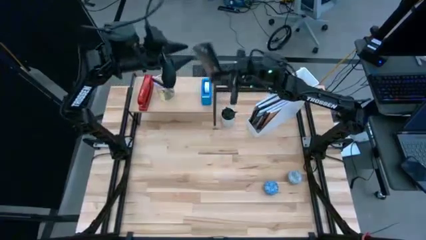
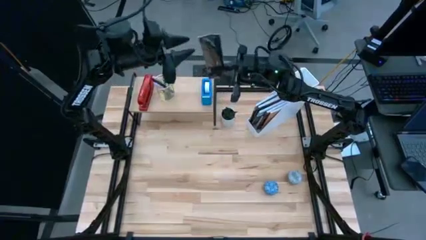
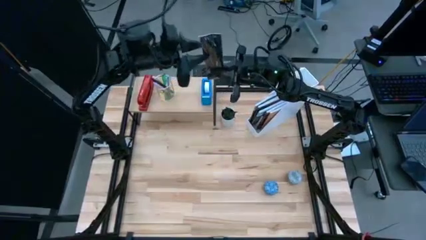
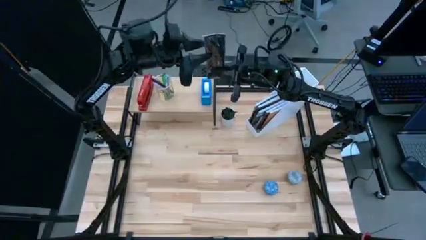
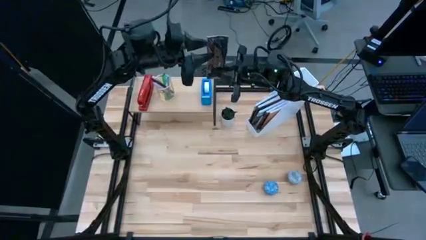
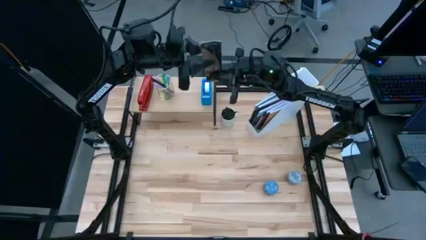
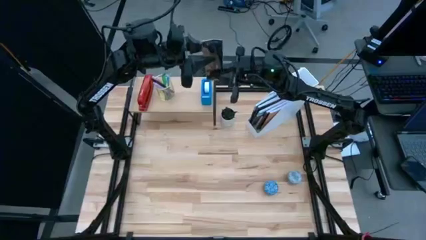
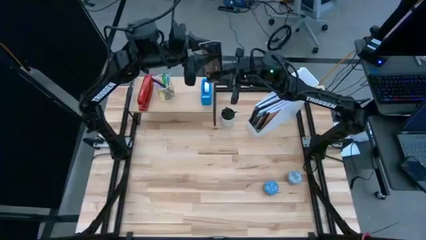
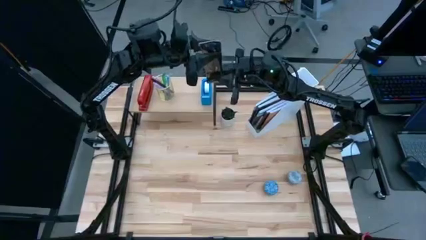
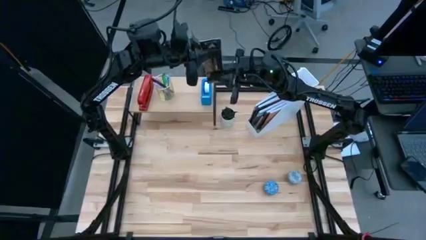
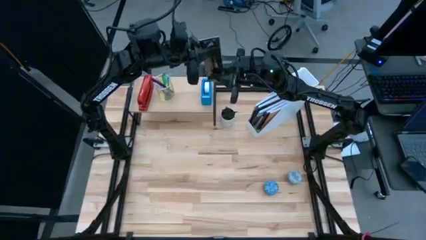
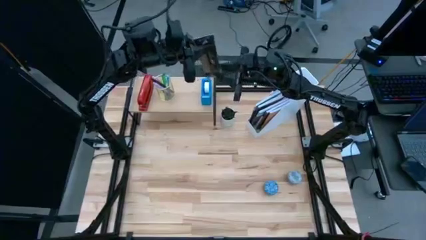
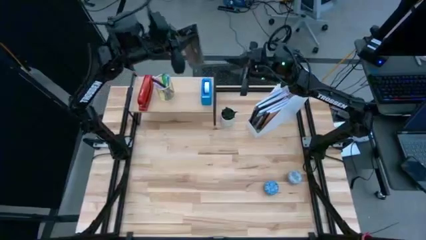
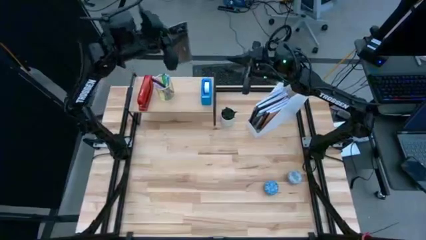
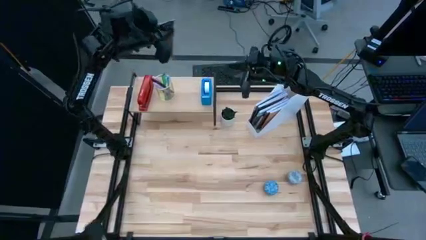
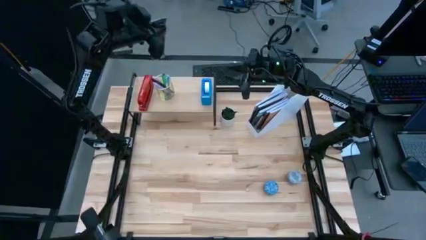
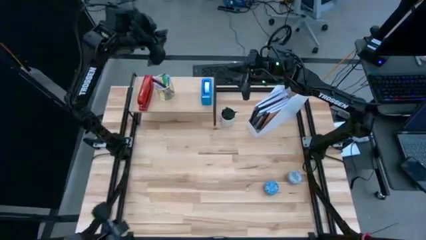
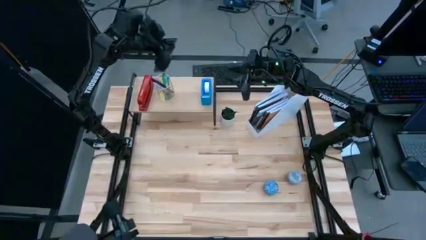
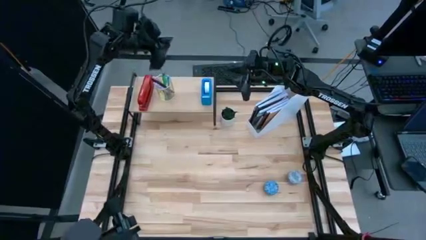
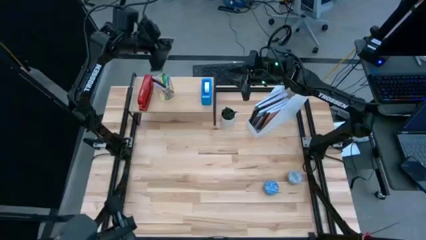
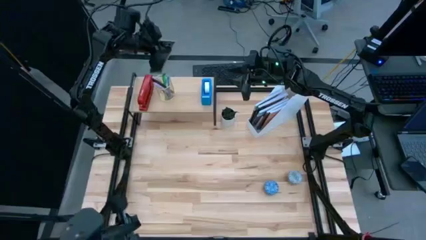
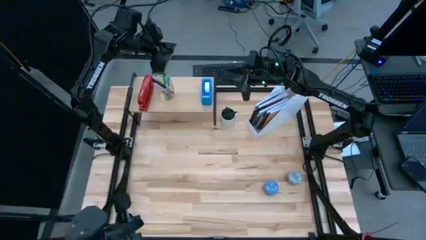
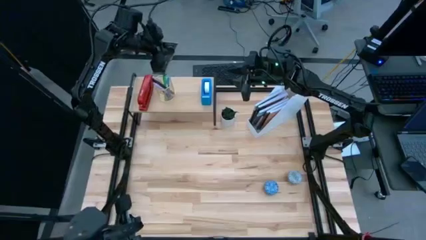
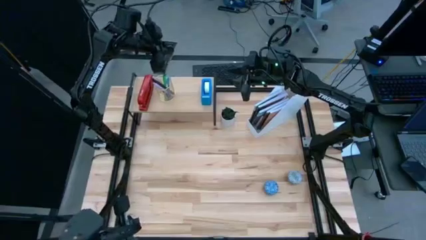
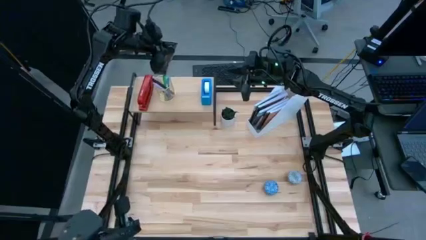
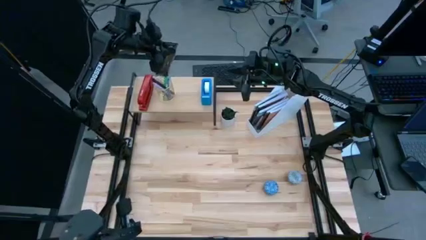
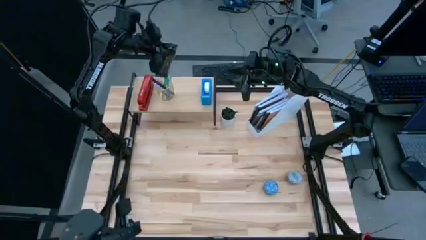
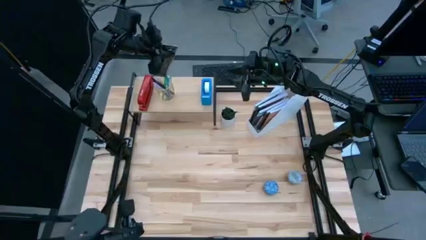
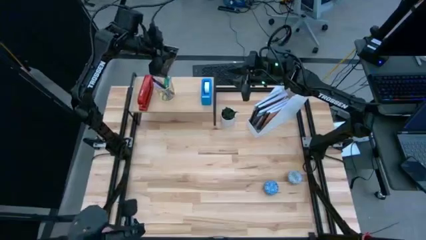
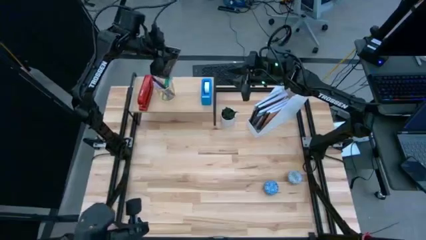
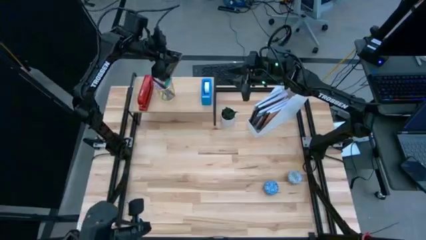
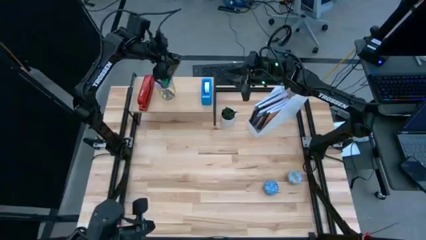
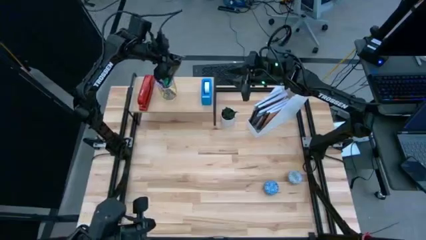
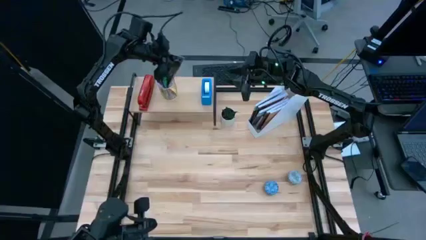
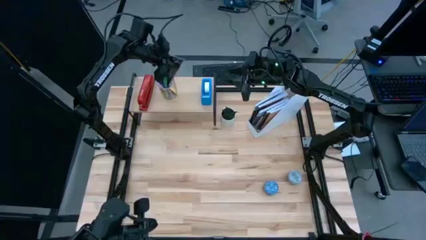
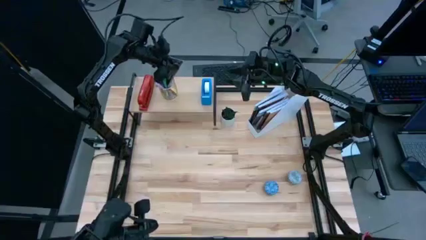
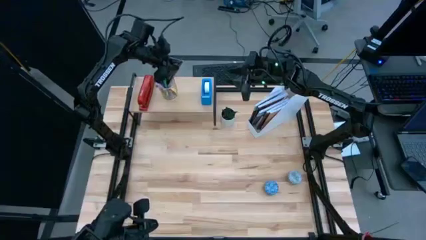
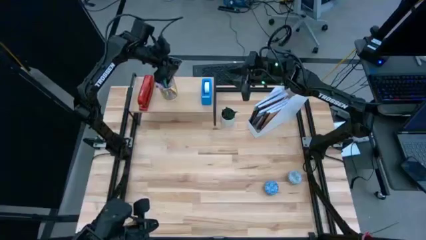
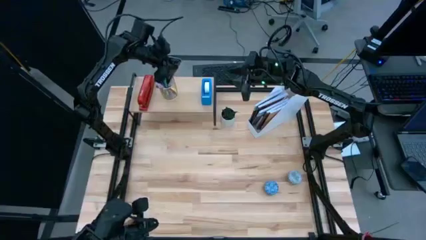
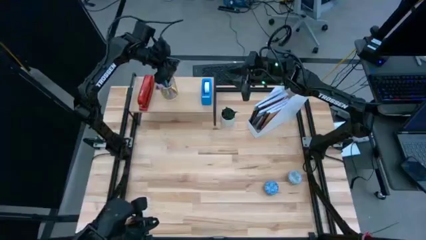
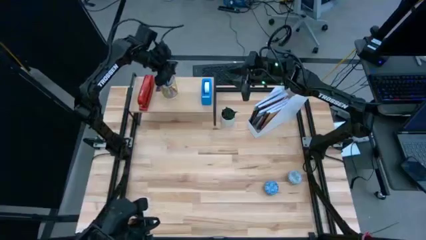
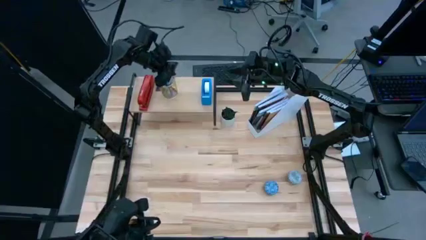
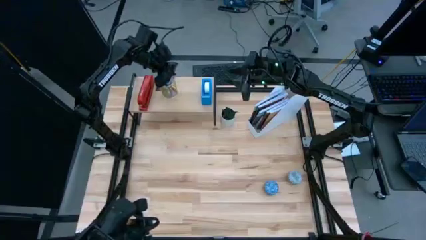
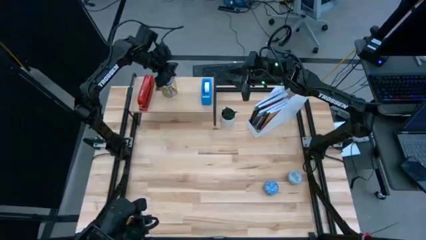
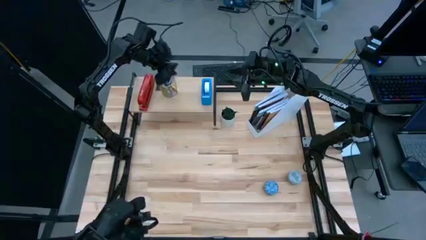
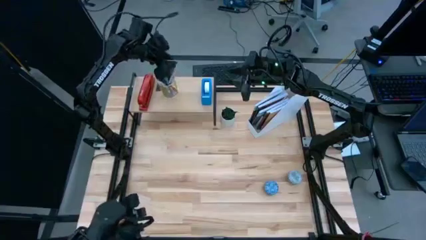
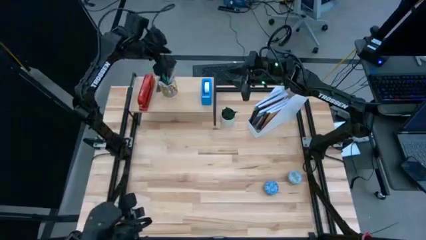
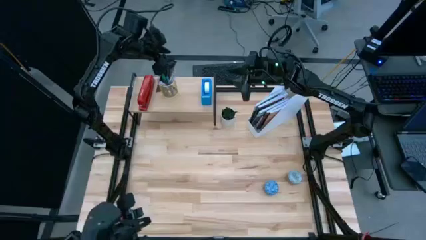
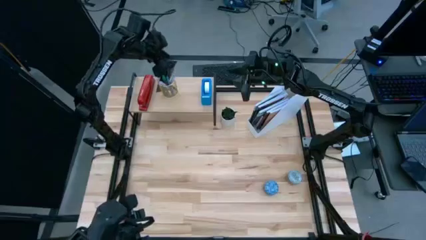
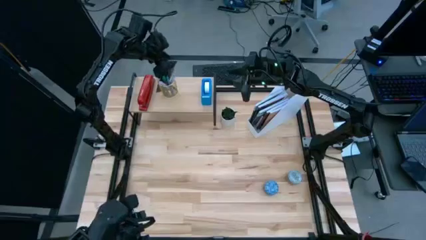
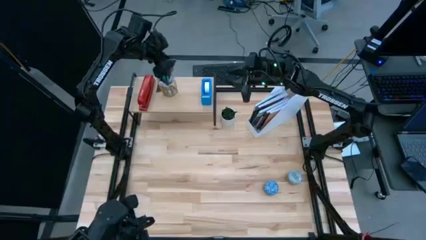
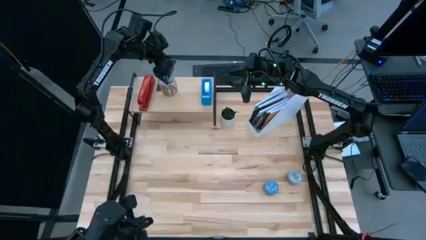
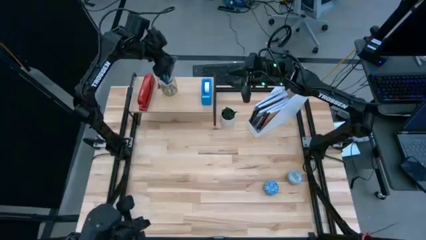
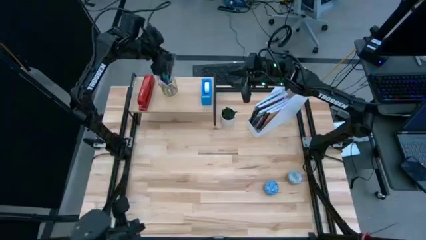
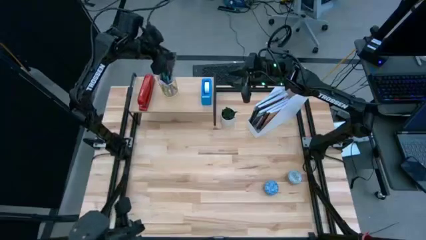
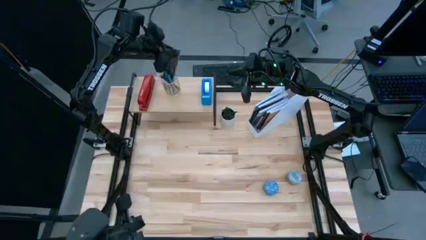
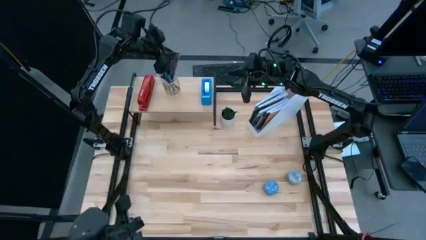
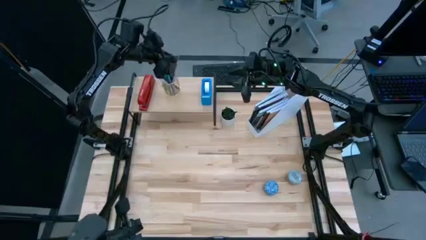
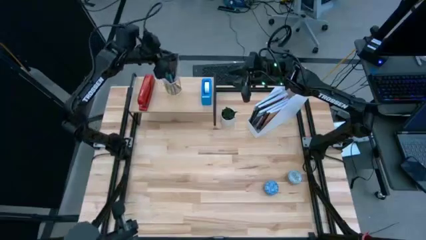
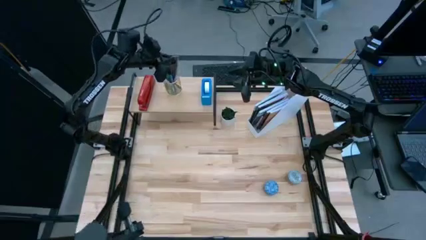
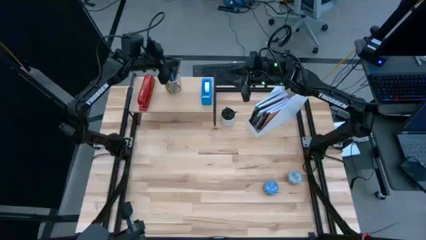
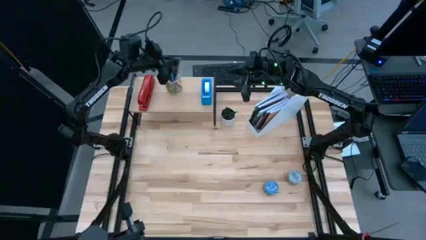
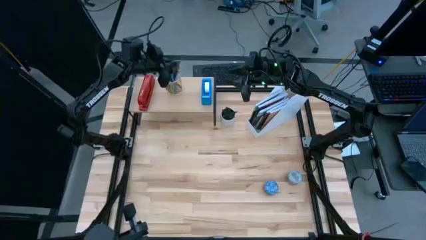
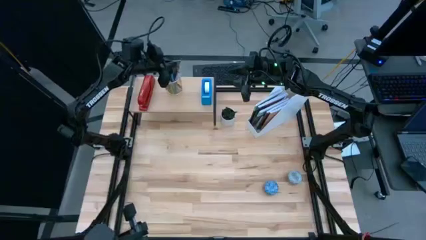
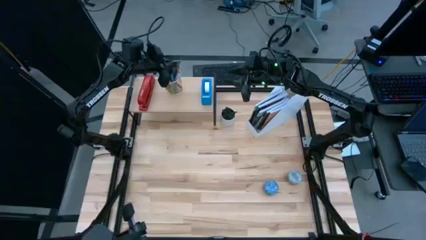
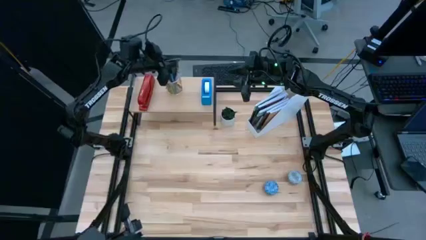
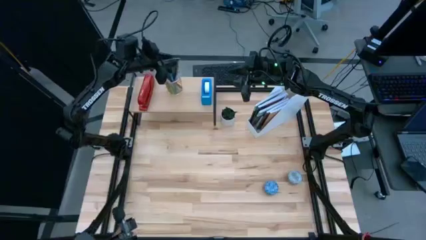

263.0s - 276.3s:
Task: Stock shelves
Put the pack of pens into the gold pen holder on the shelf

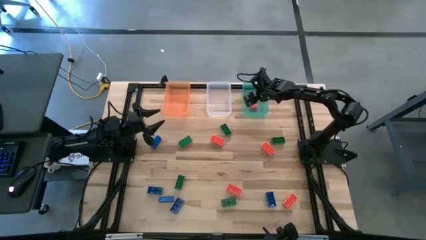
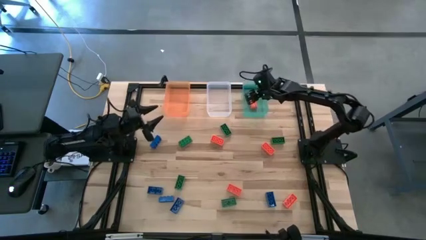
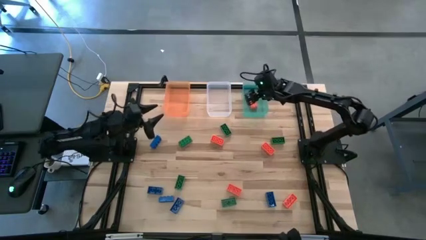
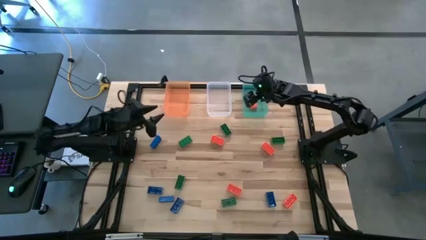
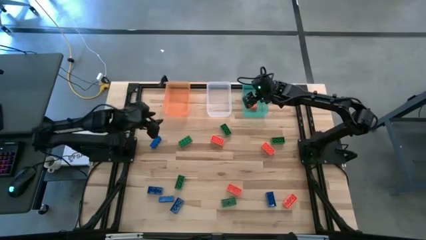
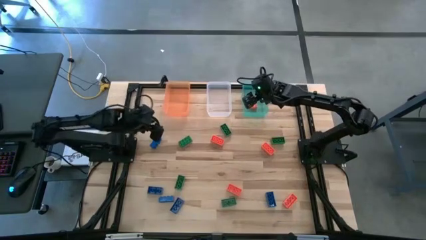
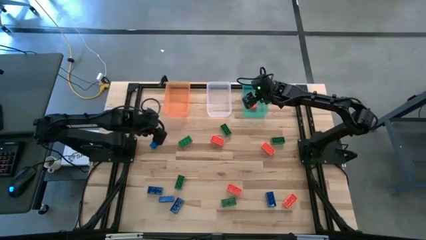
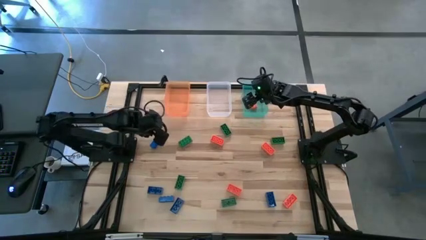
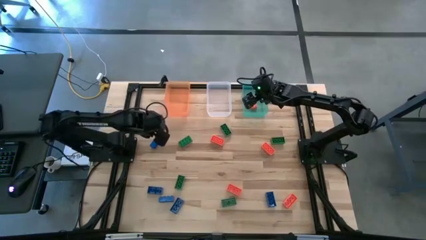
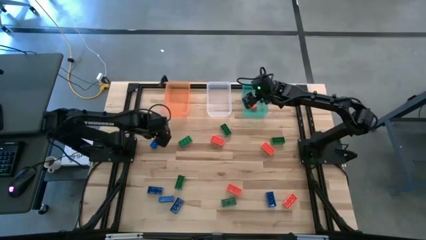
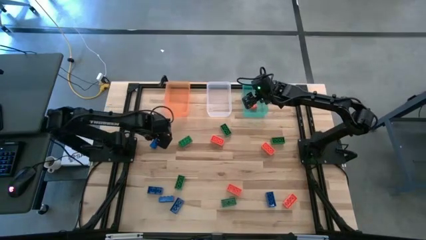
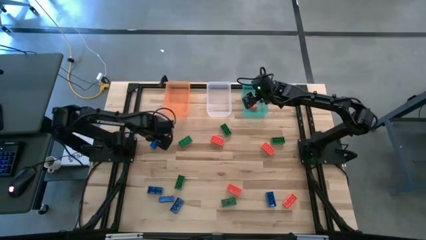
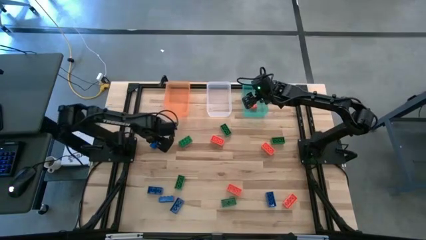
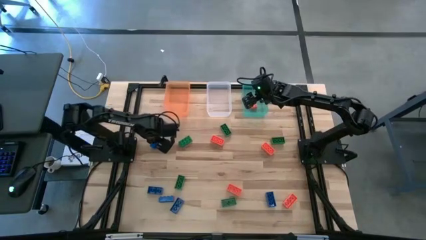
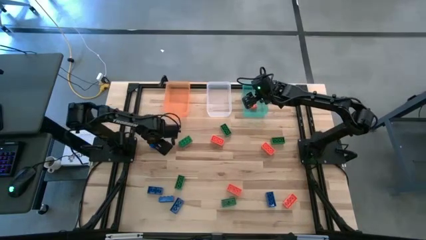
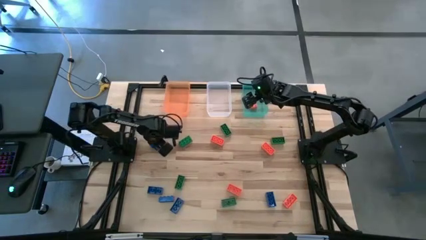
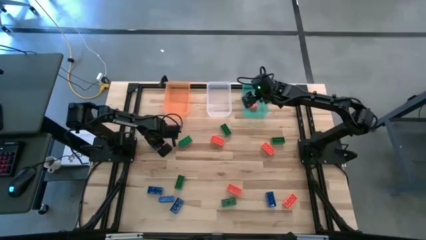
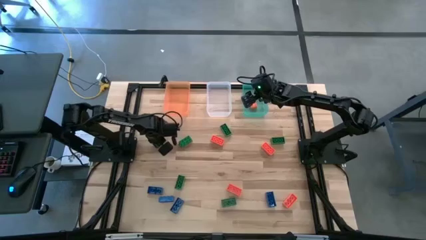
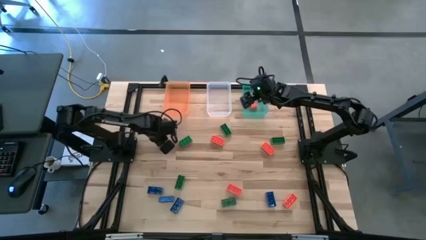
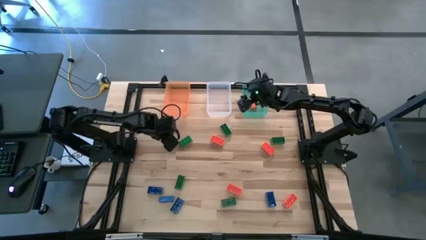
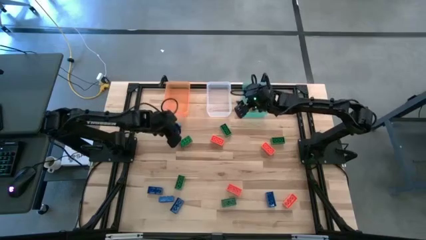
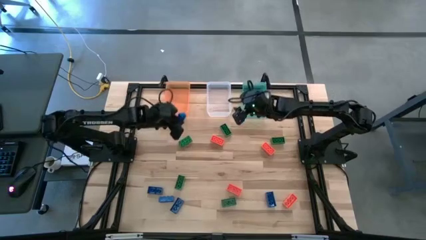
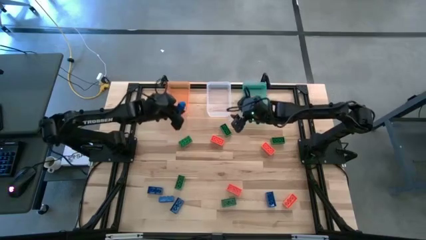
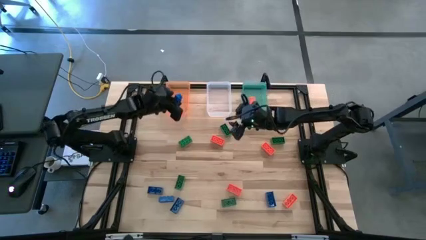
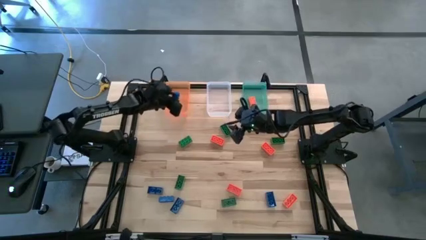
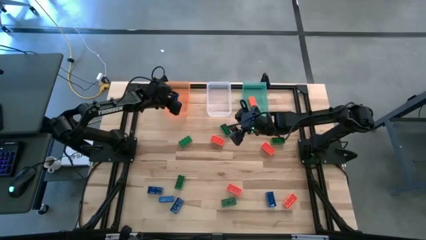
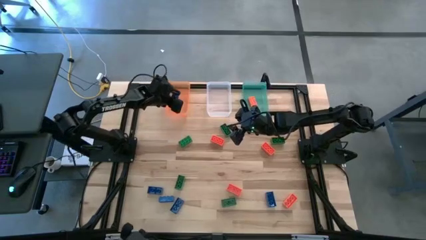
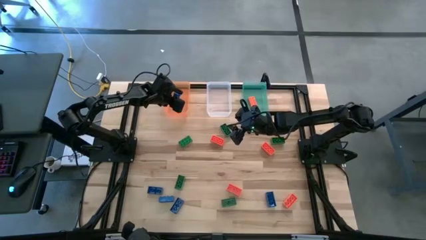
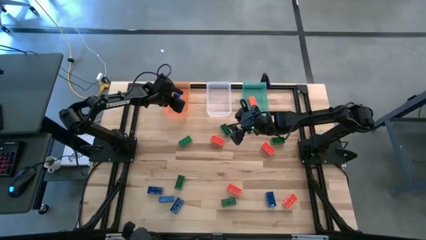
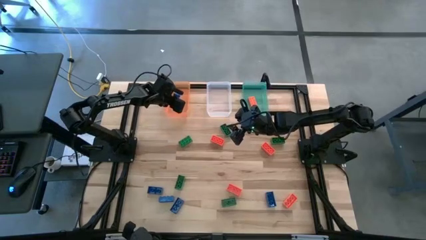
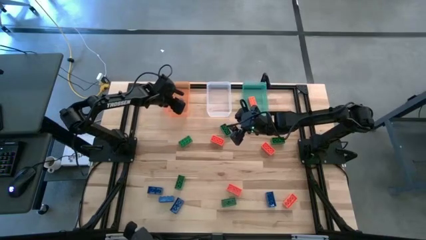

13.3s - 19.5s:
Task: Sort & place blocks by color
Put the game piece into the orange bin
